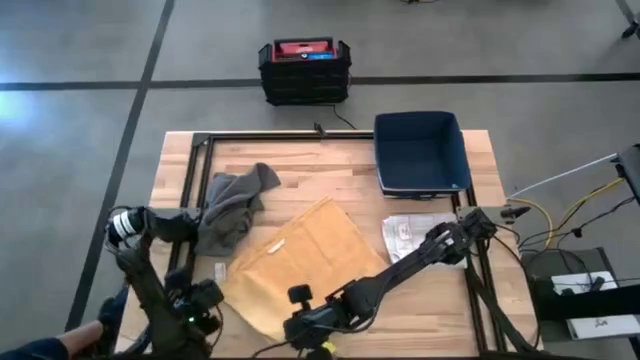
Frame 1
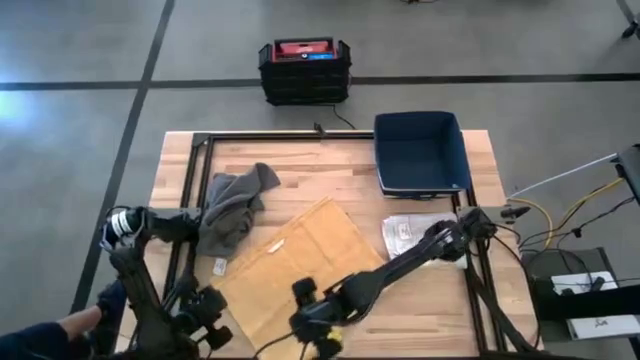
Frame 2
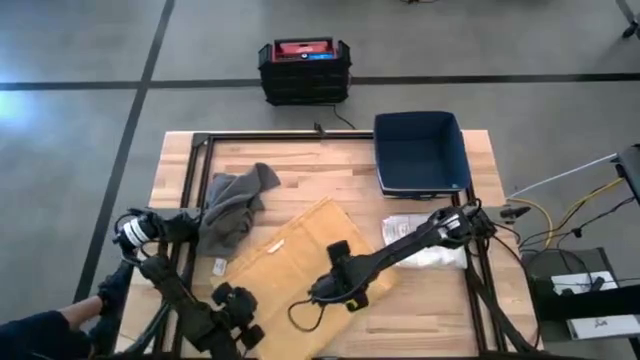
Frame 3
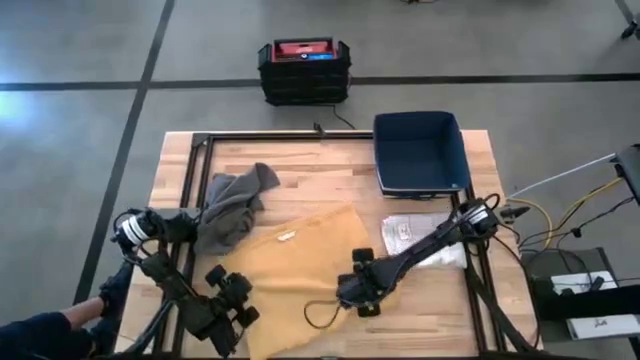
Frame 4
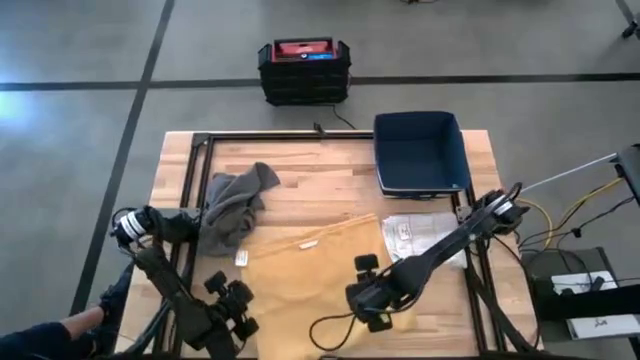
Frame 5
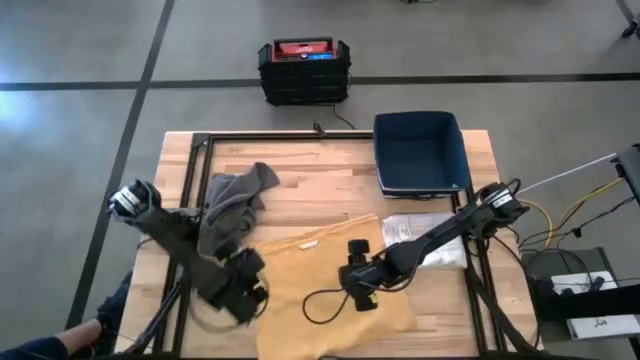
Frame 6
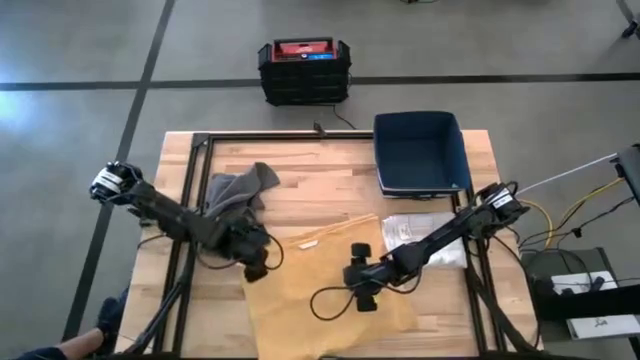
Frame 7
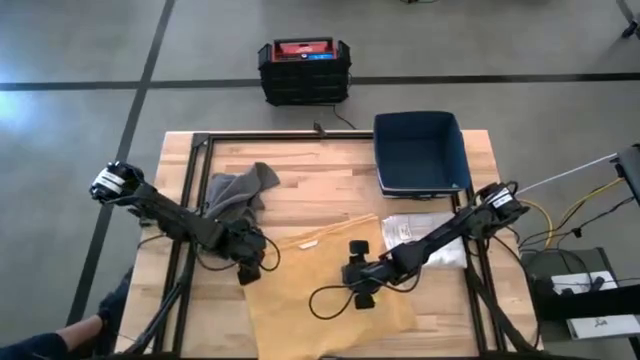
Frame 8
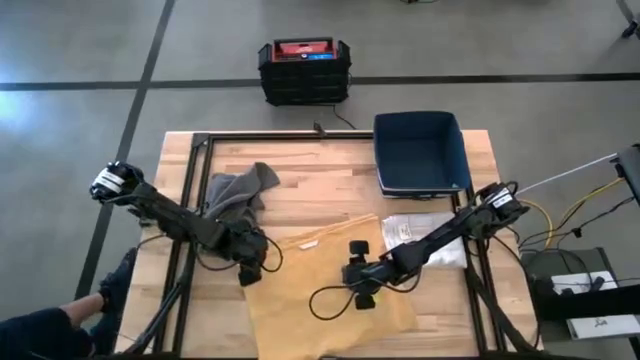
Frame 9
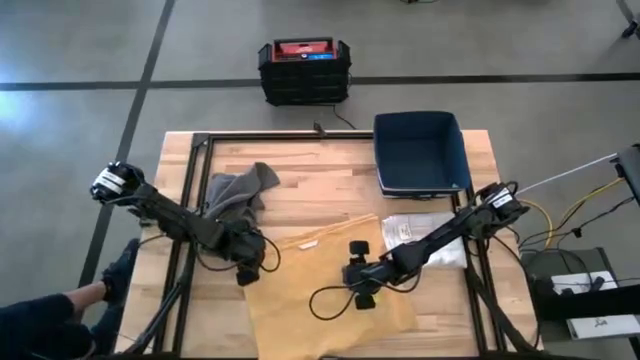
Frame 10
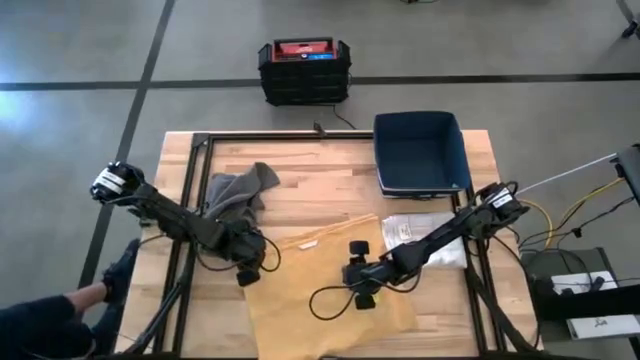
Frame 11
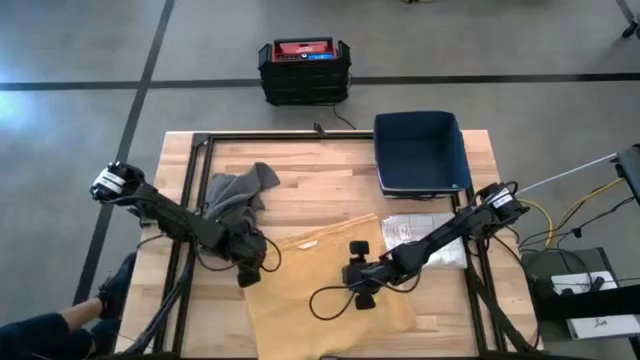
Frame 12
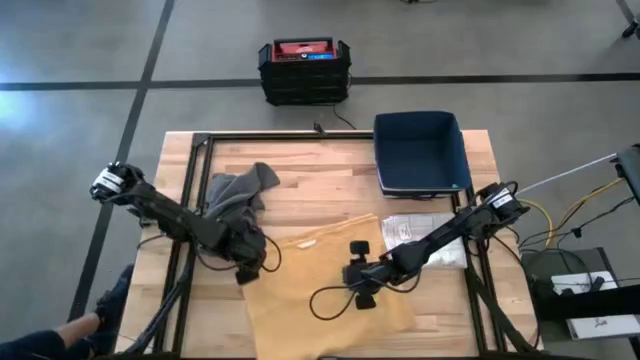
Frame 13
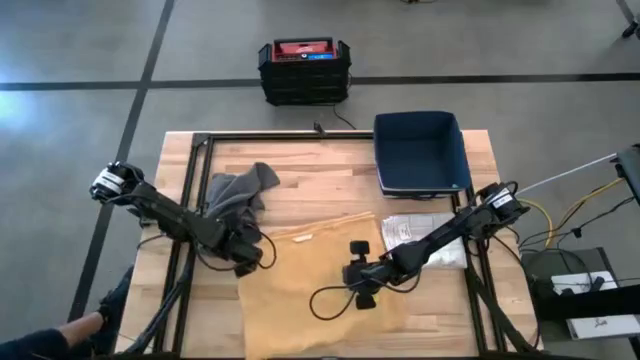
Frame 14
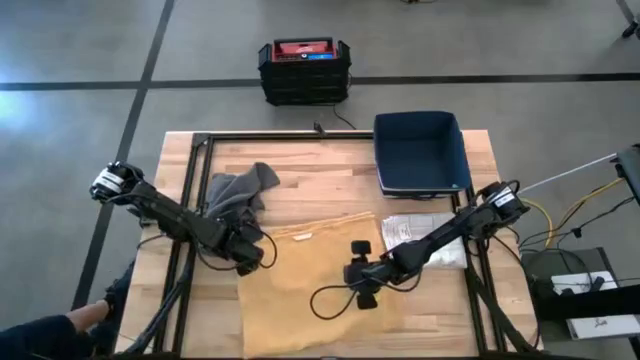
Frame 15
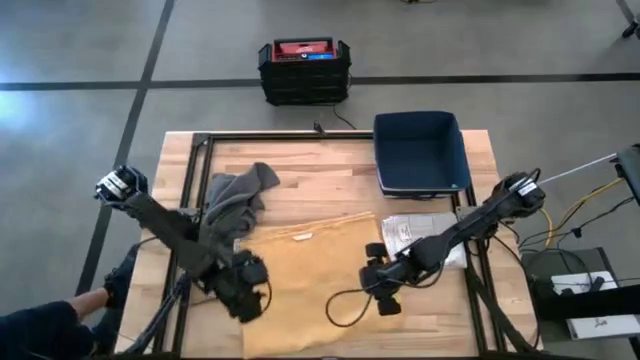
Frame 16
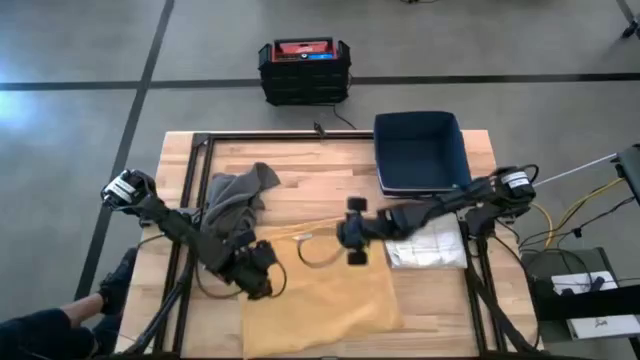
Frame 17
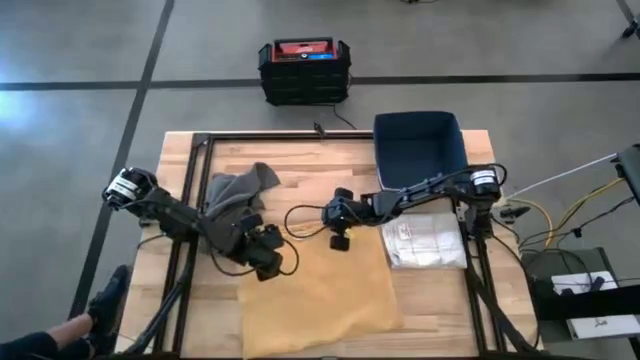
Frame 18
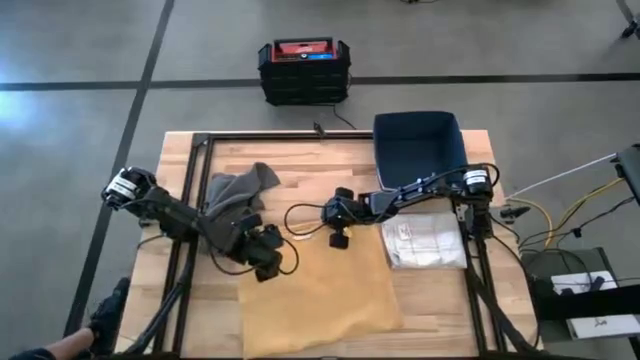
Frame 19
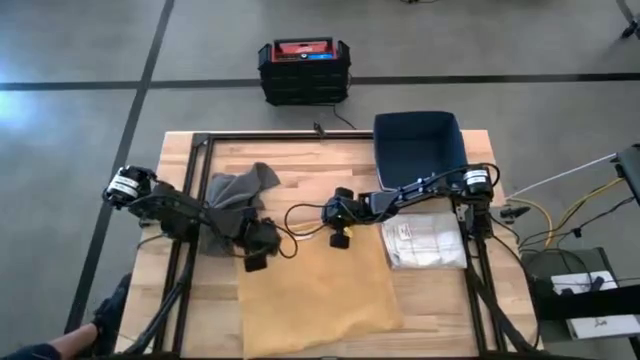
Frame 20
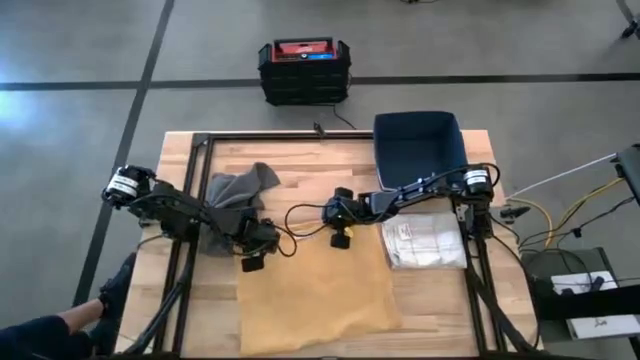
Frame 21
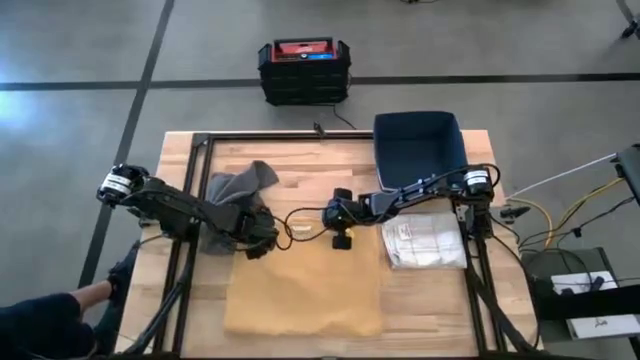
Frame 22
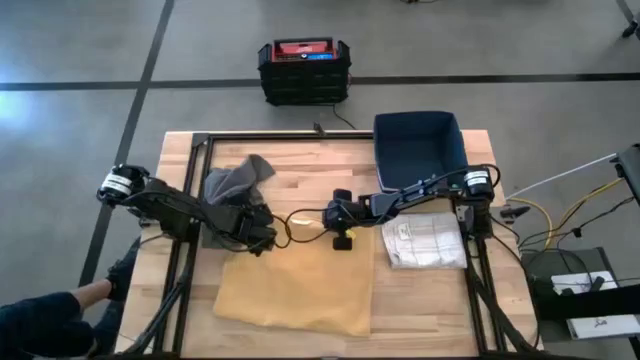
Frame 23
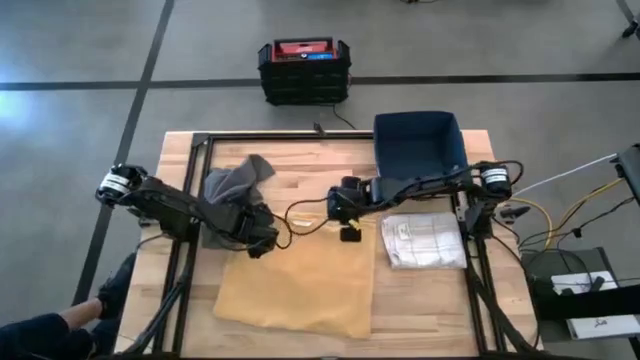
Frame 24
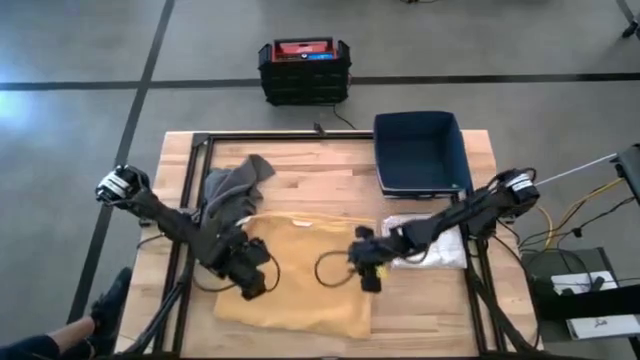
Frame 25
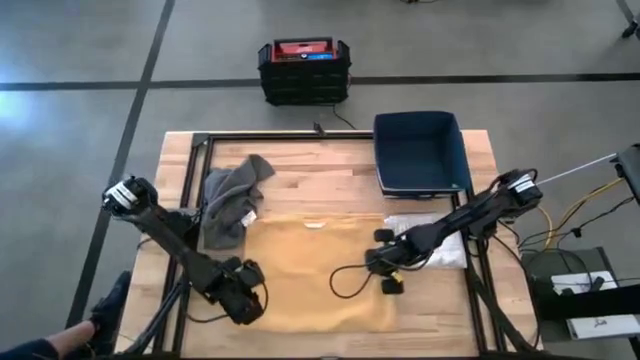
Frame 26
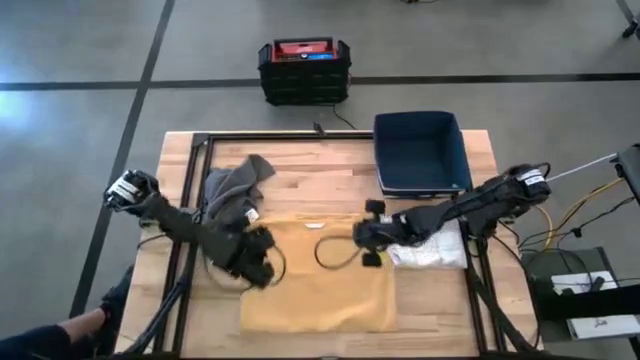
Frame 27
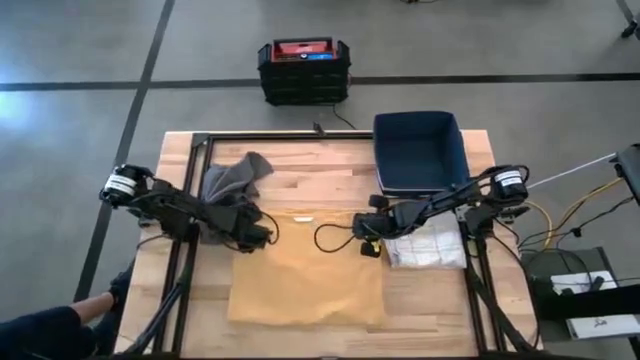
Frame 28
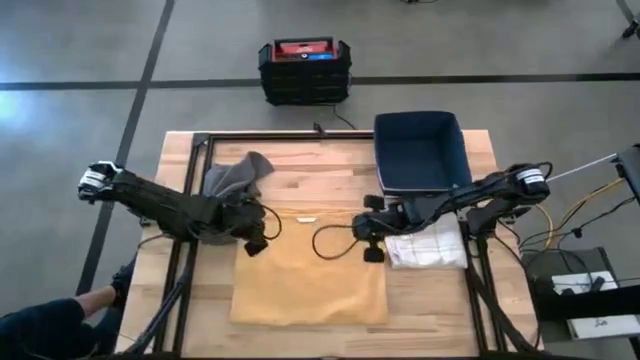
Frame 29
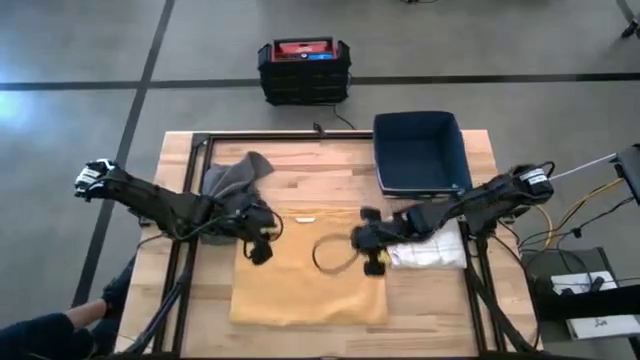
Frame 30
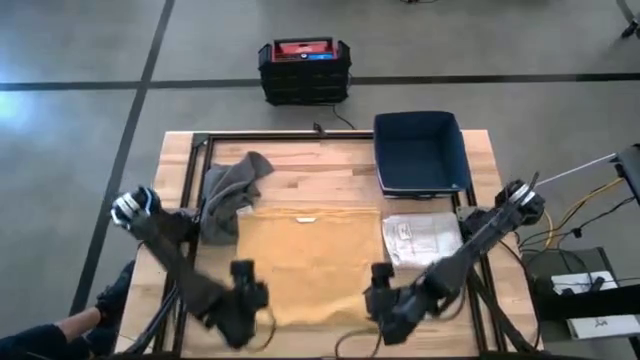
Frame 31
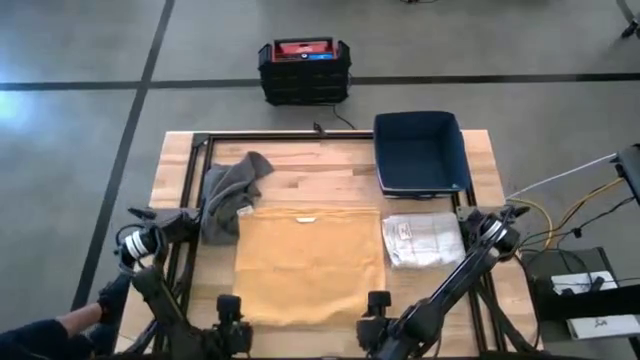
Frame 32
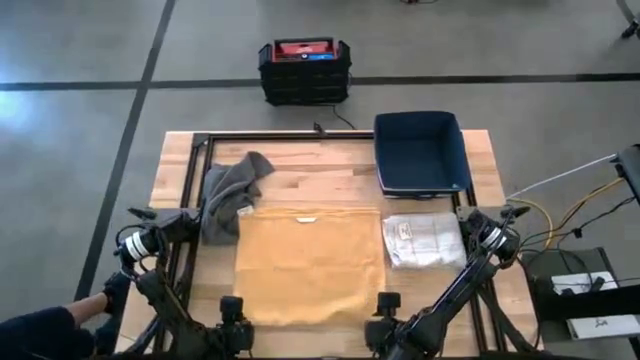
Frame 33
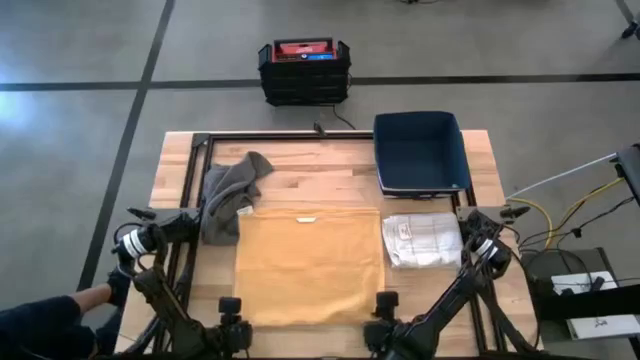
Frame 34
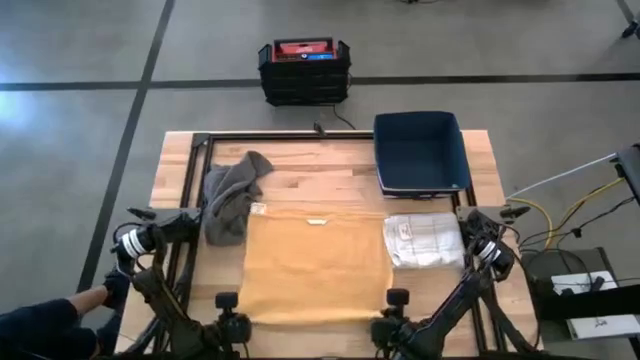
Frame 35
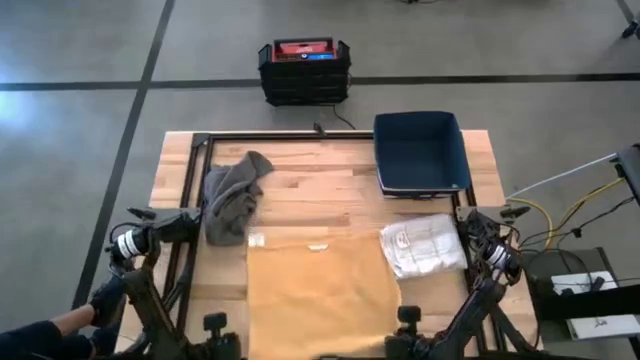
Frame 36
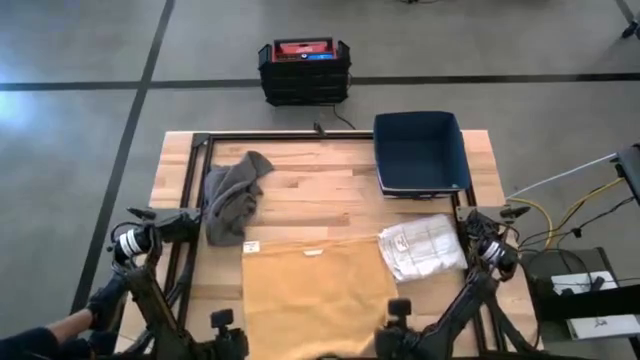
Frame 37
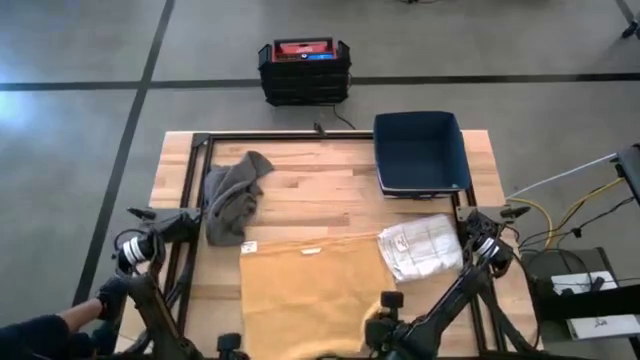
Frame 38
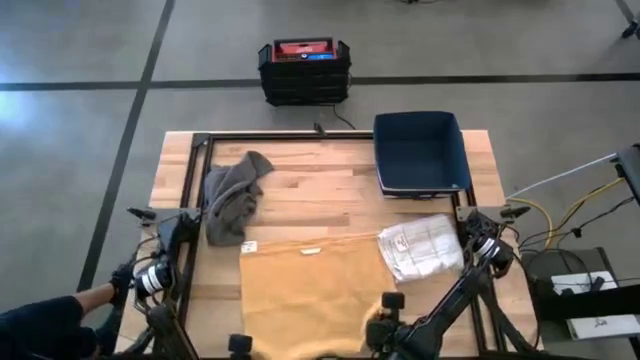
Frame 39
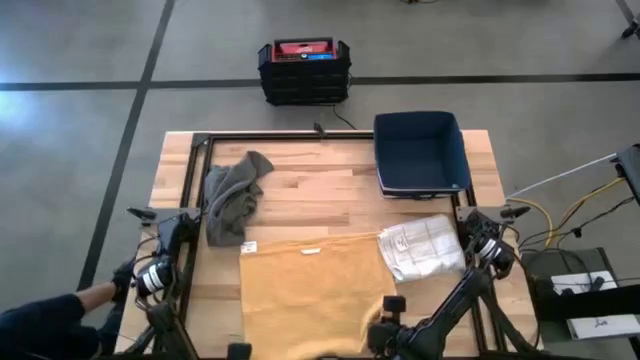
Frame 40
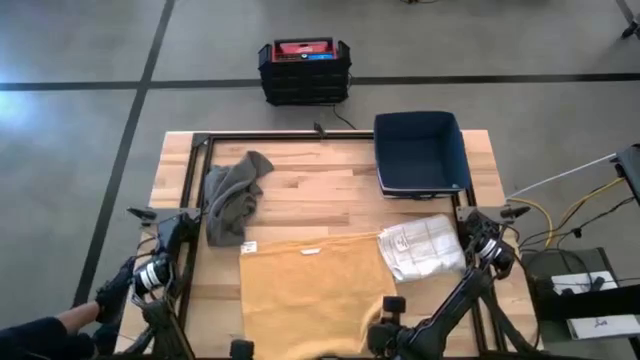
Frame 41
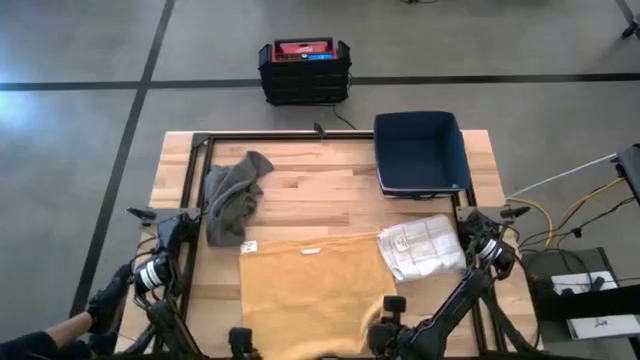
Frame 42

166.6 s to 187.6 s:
Task: Fold towel
Fold the yellow towel
